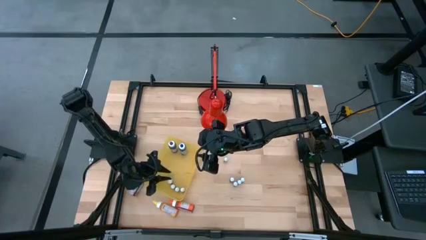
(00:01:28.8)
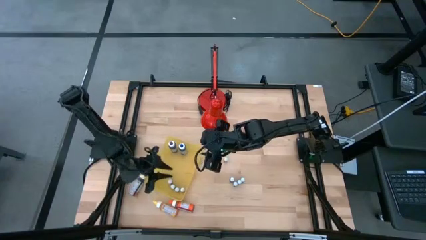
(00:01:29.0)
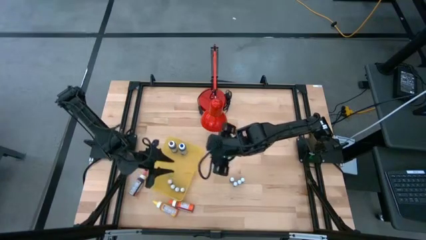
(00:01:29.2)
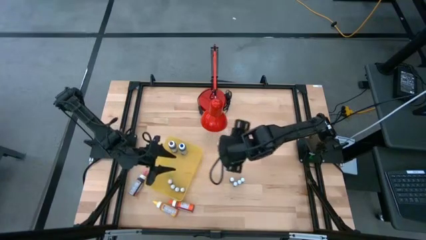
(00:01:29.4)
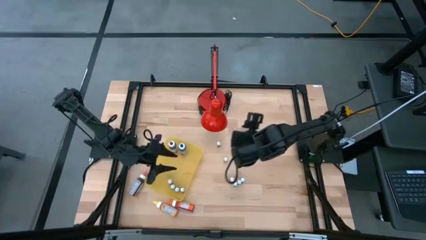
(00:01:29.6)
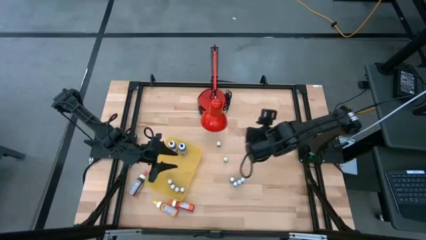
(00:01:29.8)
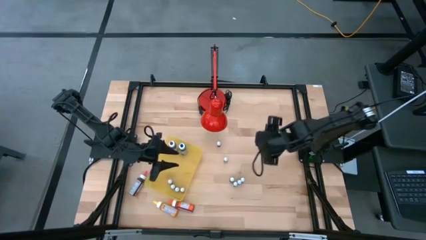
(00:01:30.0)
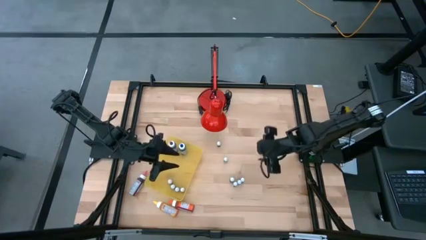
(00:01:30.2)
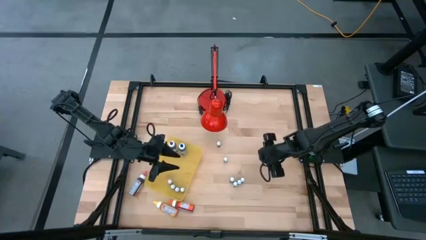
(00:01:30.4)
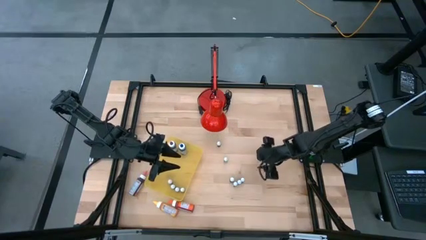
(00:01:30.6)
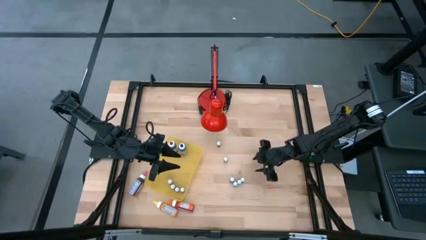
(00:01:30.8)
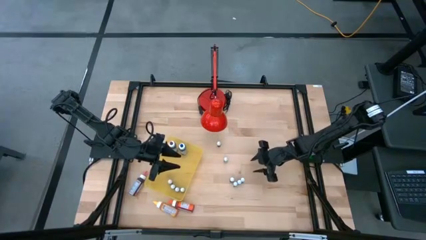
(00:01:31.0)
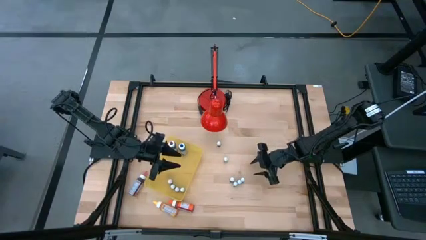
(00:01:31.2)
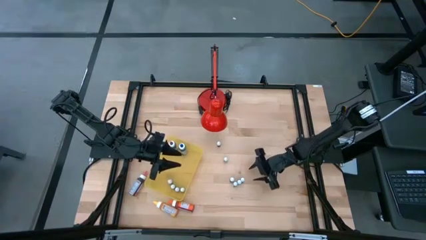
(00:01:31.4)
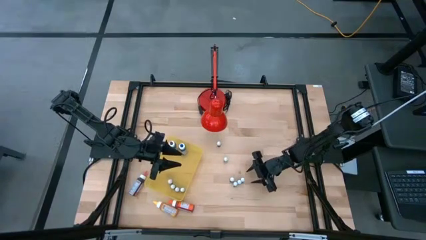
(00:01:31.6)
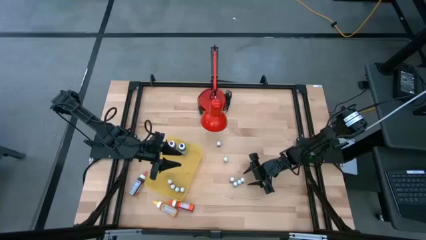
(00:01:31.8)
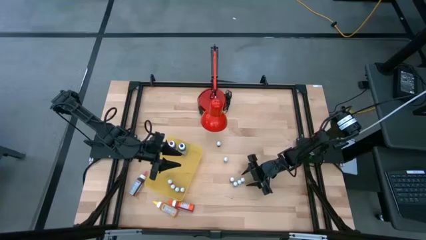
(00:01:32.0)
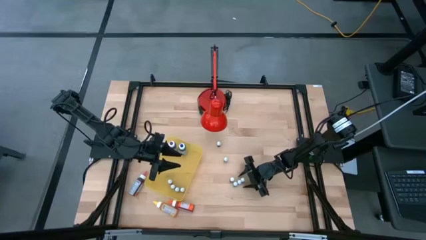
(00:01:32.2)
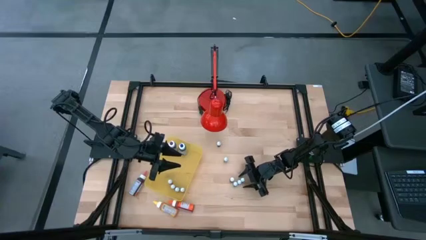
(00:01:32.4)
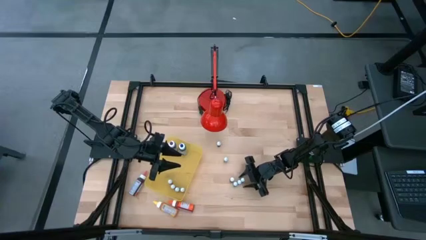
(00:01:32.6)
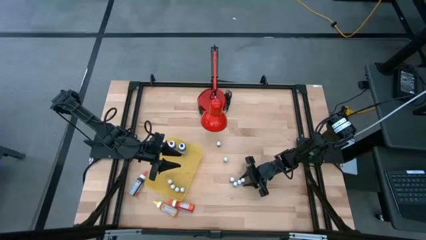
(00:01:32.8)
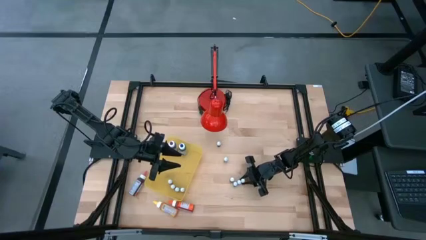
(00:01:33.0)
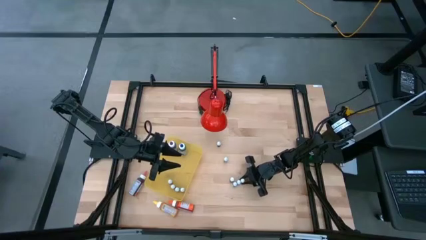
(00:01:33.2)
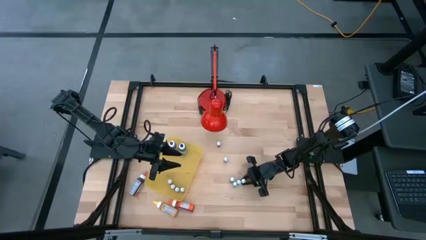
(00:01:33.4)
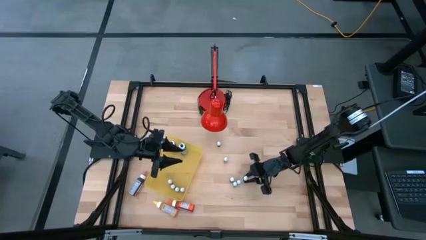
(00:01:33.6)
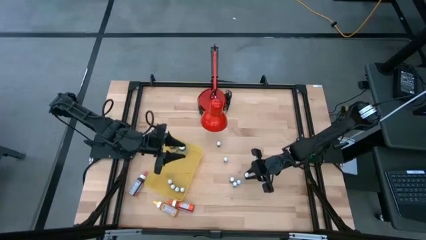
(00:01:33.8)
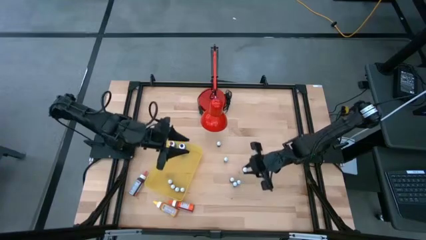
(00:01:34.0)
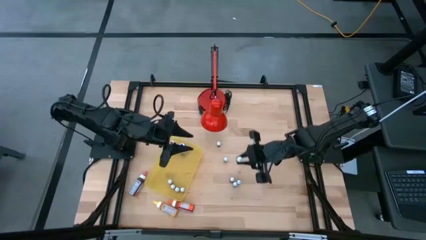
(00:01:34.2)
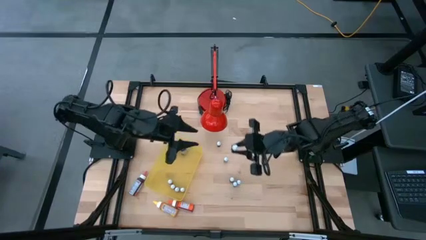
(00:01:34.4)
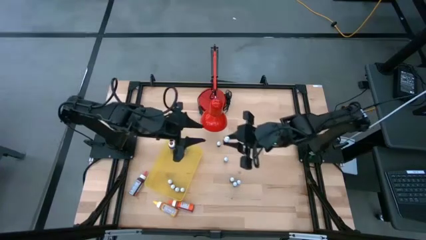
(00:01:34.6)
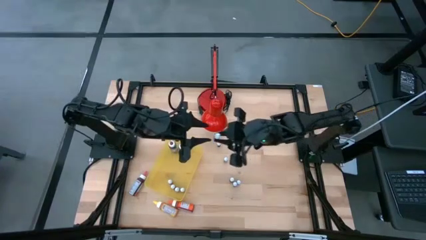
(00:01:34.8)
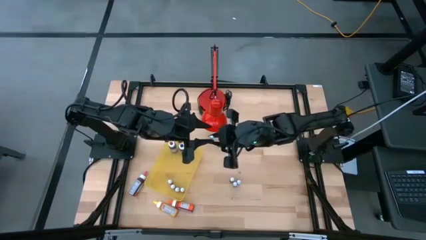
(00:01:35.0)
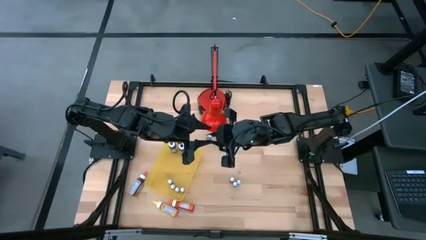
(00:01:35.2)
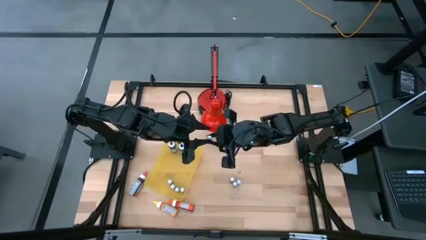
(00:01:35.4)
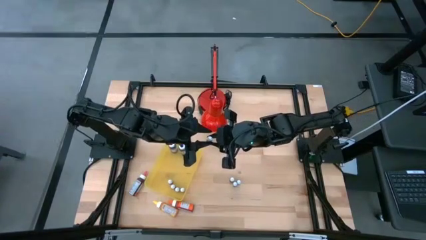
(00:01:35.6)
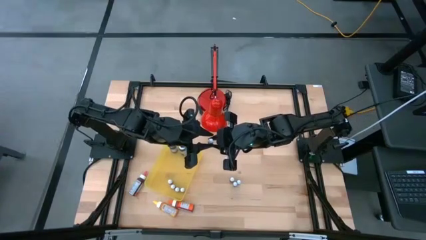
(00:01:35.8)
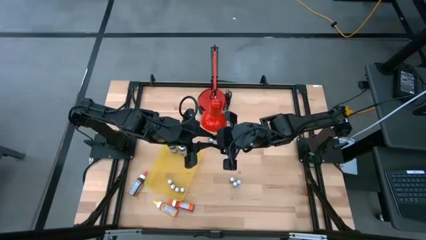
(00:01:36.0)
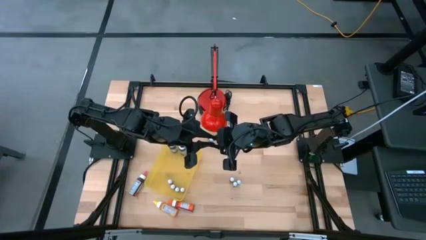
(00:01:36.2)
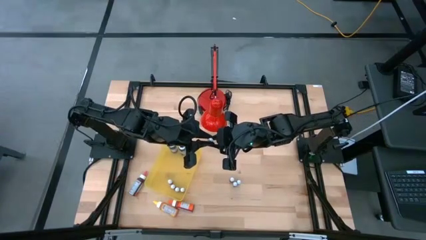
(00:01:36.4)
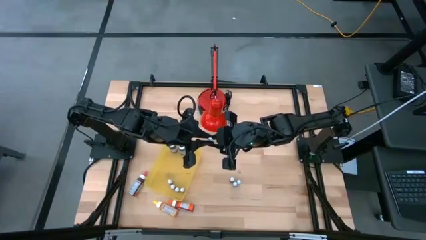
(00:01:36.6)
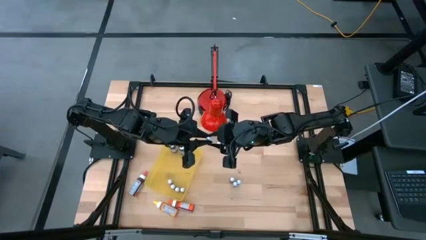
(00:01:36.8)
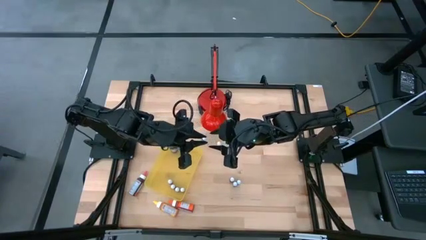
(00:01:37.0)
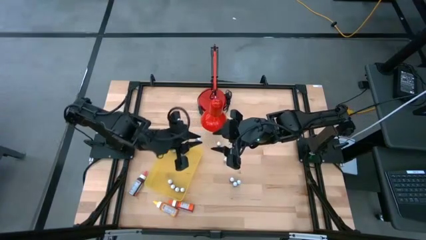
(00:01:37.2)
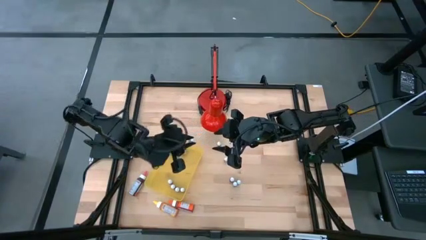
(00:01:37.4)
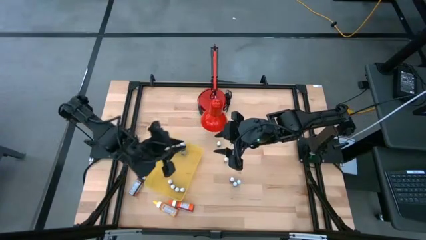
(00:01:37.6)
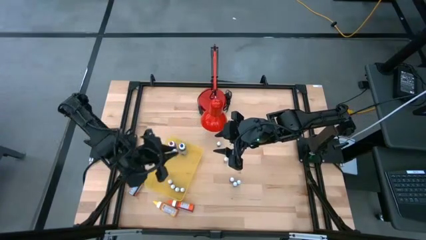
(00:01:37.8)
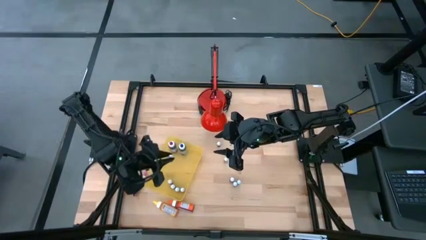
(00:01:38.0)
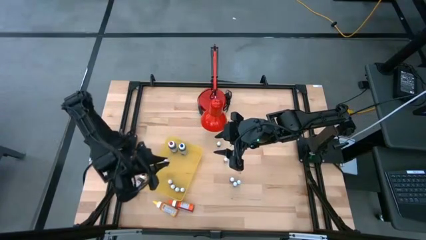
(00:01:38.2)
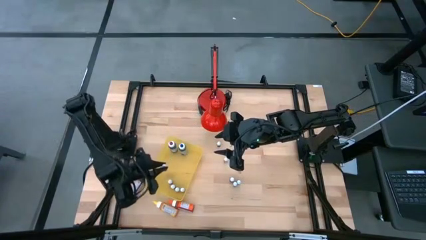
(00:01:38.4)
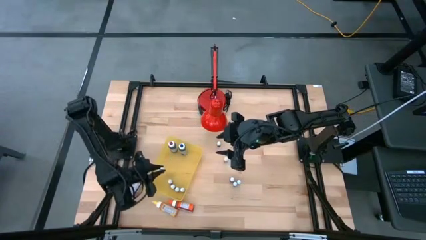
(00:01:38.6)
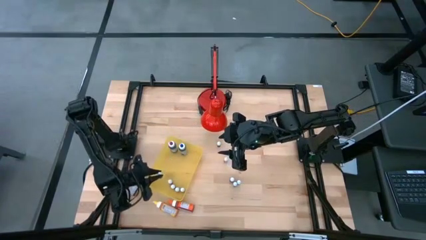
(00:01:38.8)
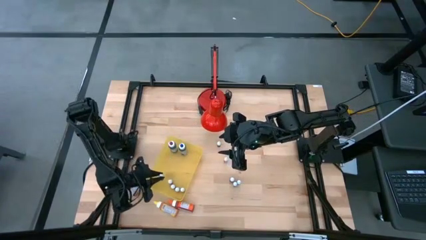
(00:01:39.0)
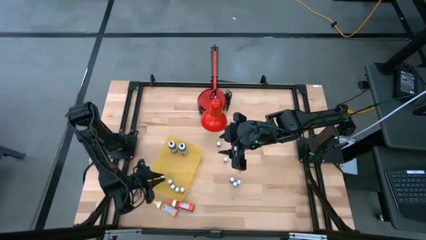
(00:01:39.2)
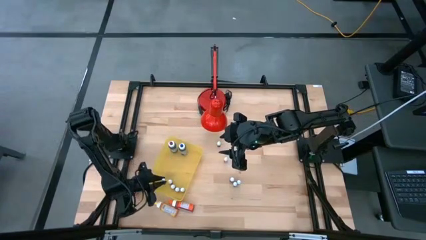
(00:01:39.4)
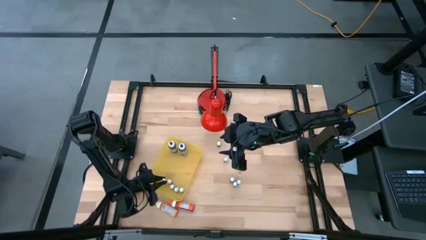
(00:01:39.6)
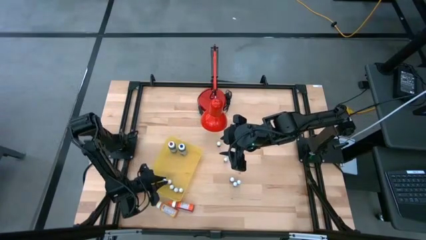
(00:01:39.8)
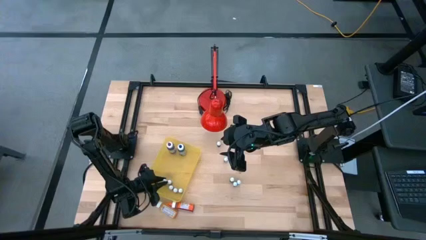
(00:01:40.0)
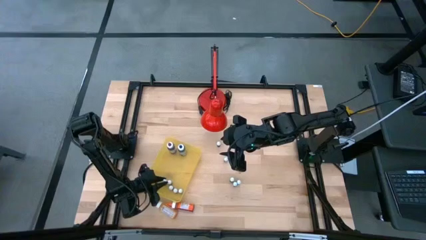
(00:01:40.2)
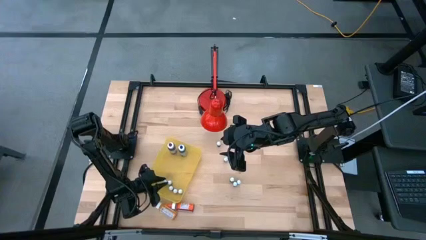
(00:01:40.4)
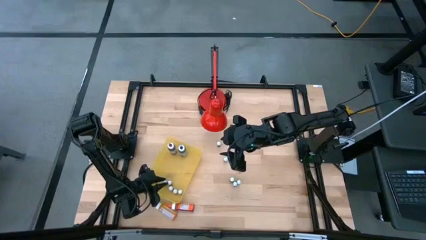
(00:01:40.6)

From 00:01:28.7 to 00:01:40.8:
Task: Pick & Place food coloring
Put the small green food coloring bottle into the yellow bin

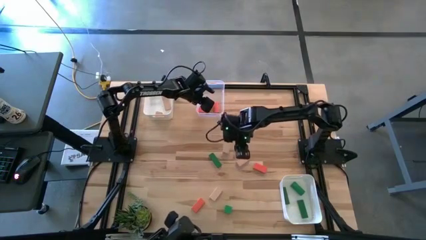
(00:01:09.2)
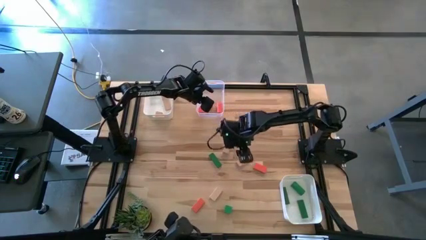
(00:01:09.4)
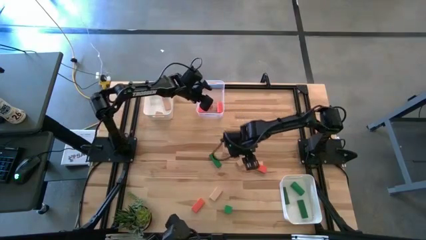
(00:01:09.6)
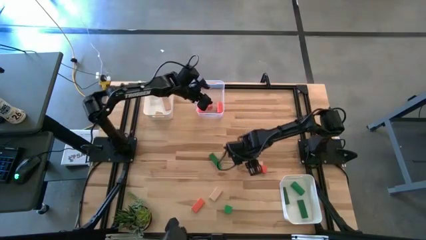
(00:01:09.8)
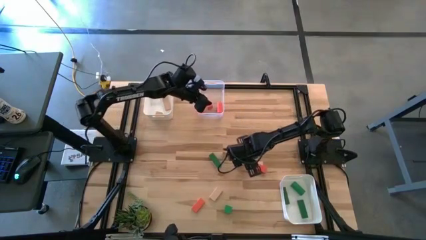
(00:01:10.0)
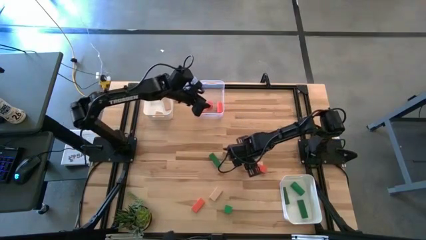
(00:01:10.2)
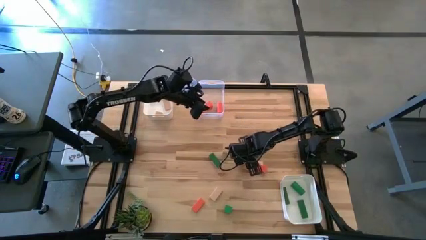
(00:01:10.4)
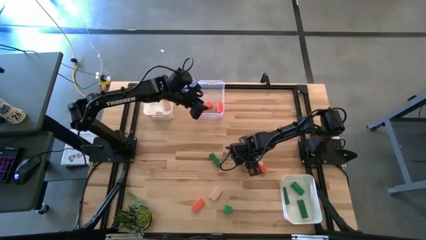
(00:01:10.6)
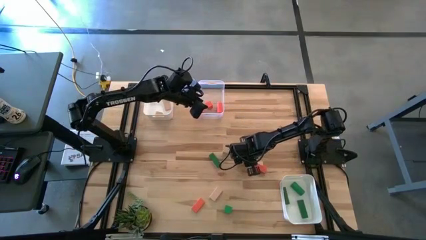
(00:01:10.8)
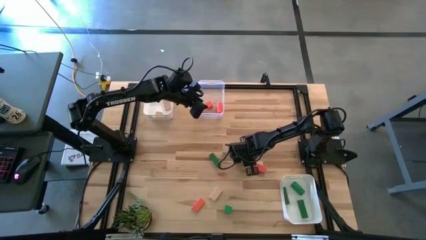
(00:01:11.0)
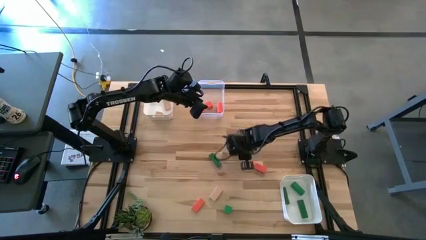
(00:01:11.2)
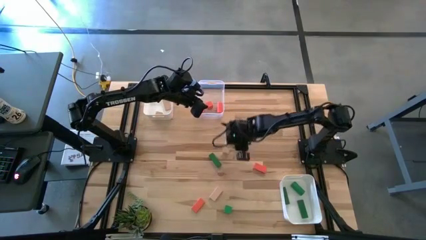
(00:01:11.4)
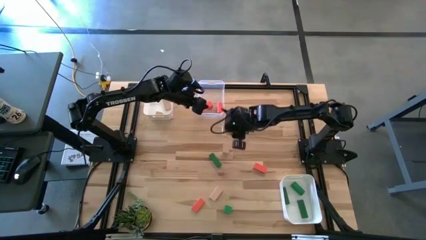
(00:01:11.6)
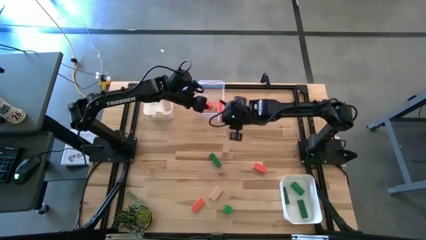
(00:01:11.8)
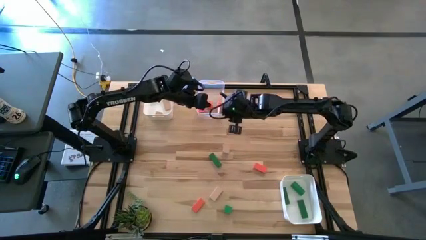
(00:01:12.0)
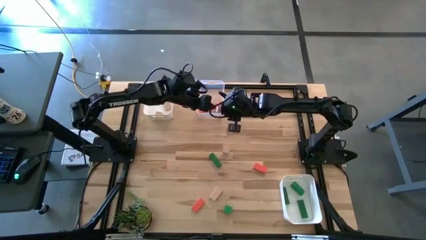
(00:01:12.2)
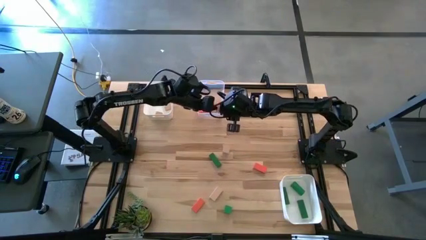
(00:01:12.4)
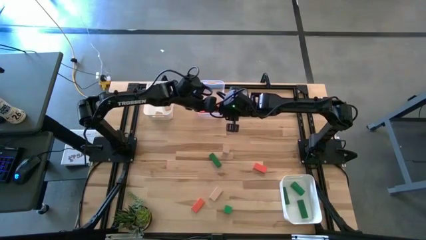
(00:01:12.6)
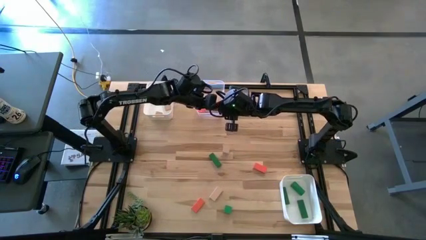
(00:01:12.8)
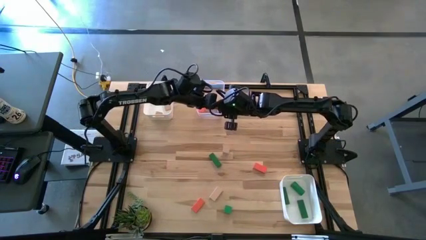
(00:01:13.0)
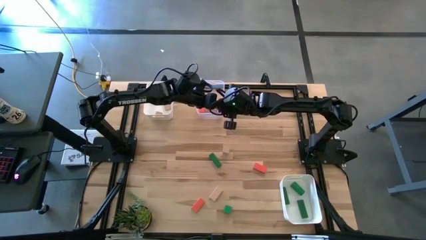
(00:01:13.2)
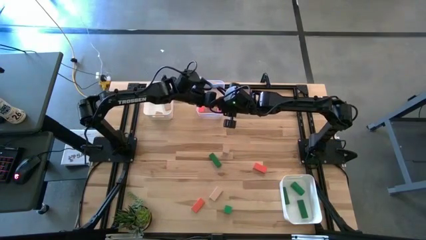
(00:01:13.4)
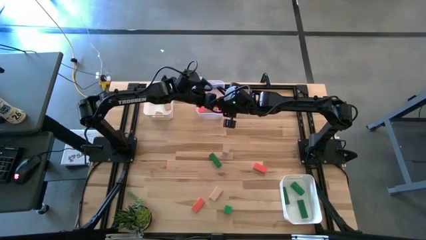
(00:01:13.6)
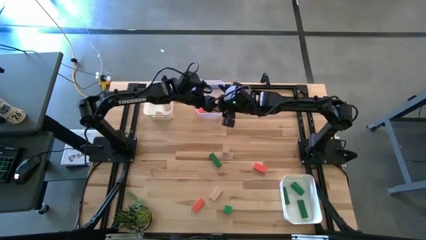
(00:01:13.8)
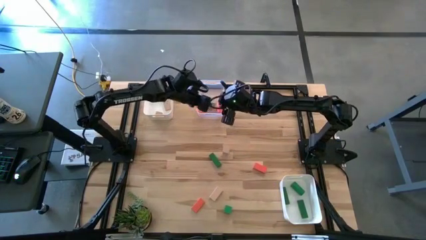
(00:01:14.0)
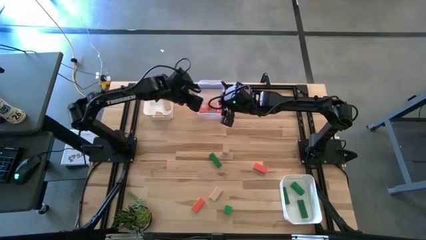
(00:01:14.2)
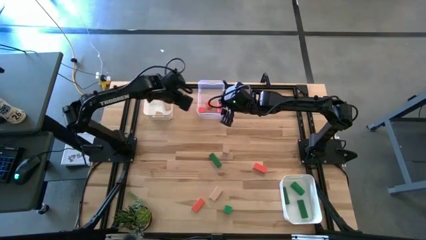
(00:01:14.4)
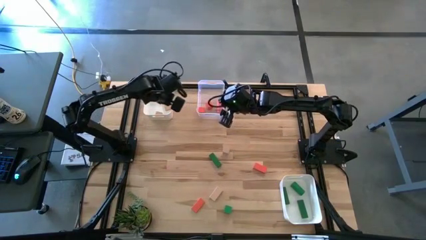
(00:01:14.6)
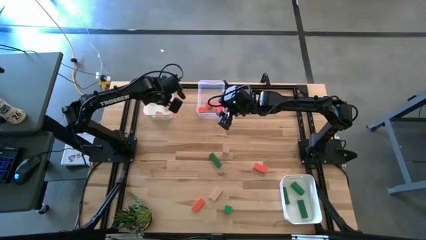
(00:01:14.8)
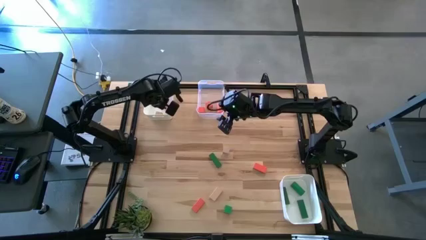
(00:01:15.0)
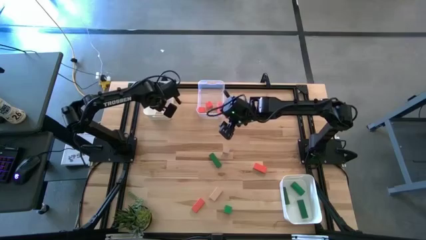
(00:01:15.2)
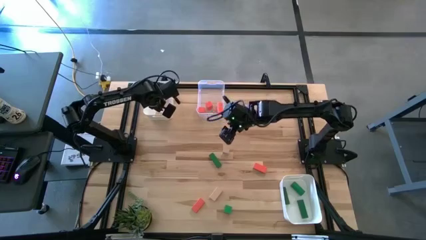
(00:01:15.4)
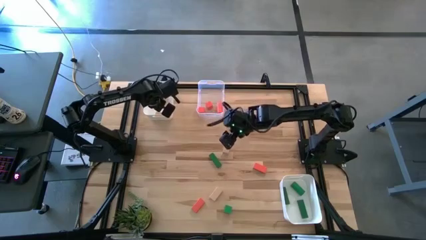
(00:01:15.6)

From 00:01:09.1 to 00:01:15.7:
Task: Sort & place blocks by color
Put the brown block into the top white bin
